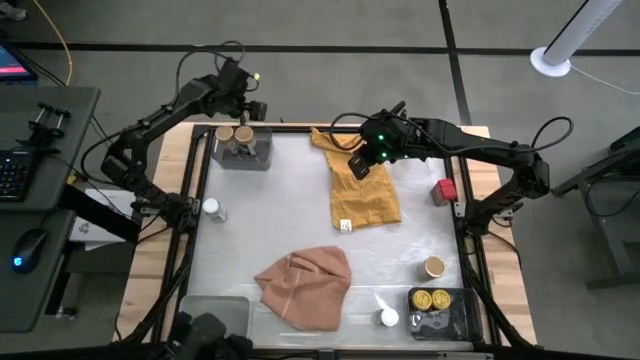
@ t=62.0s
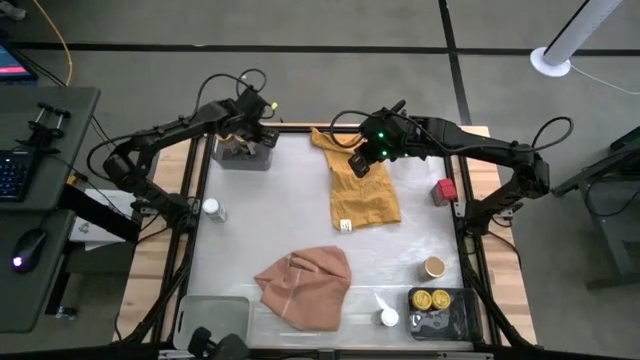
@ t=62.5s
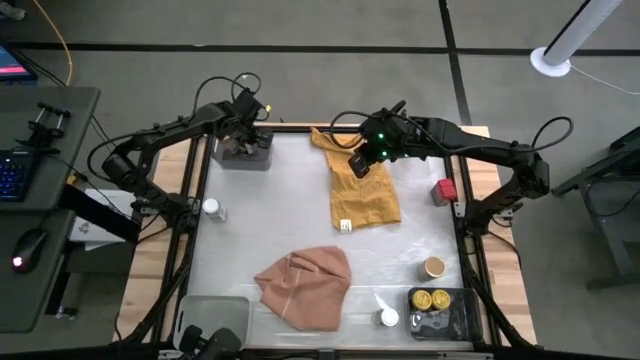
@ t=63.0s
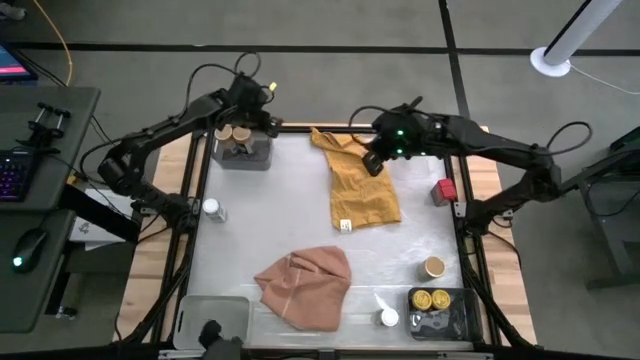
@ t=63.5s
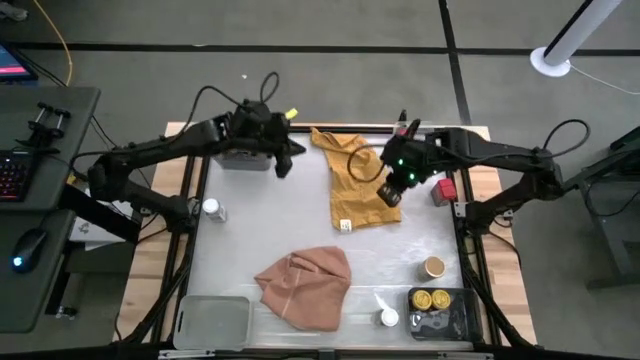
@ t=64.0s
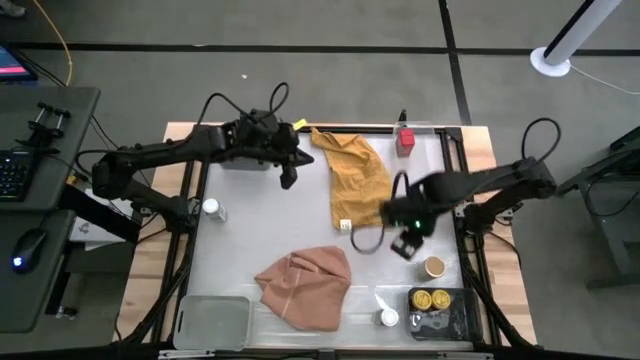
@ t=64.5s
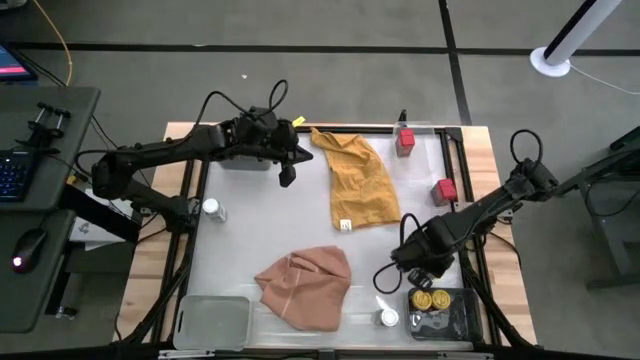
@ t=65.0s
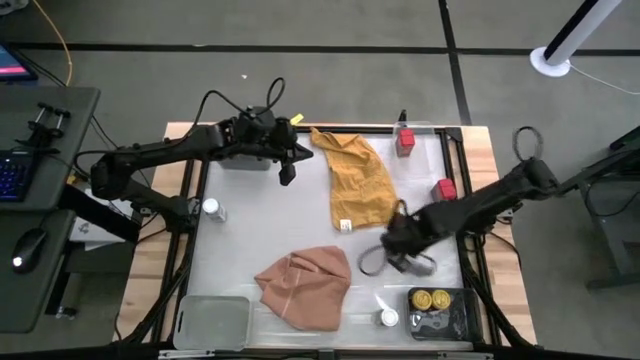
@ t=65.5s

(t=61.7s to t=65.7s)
Task: Sort spices by type
Put the brown seasoning bottle into the top left black bin

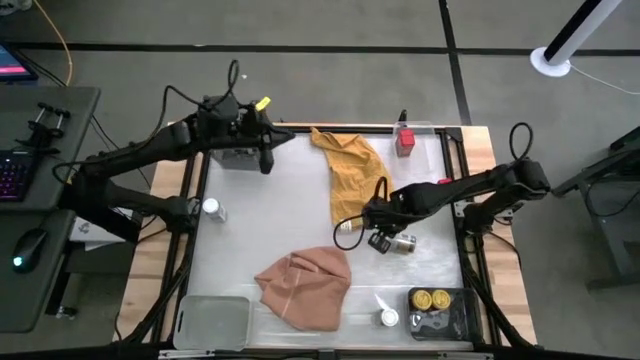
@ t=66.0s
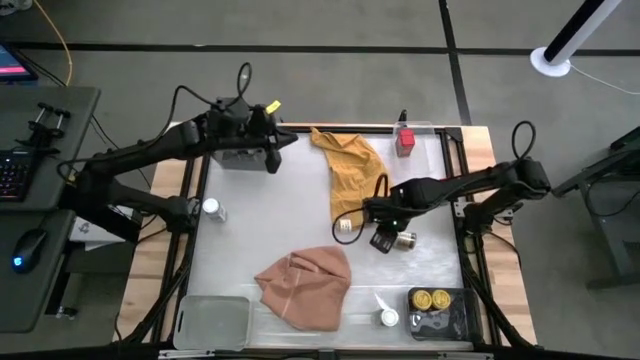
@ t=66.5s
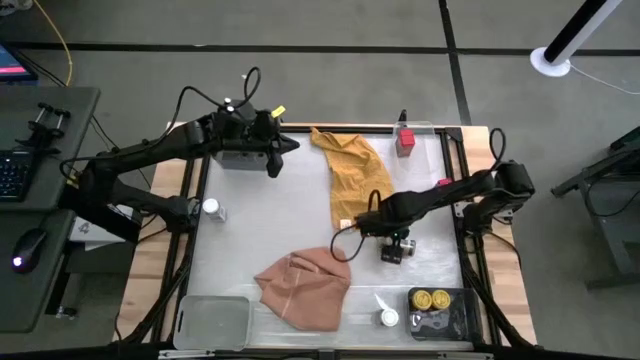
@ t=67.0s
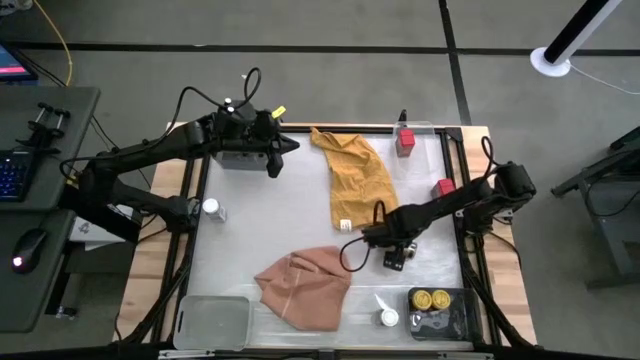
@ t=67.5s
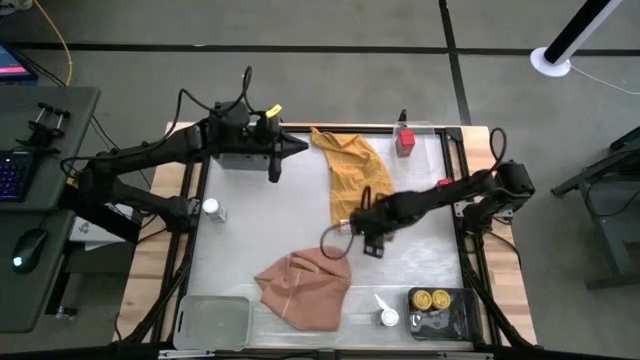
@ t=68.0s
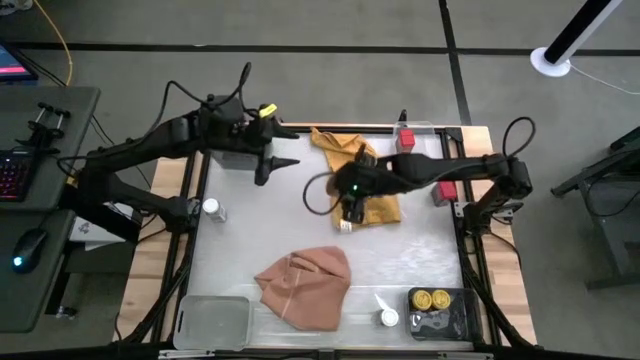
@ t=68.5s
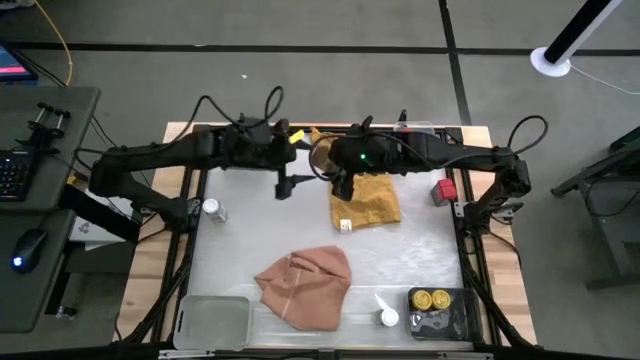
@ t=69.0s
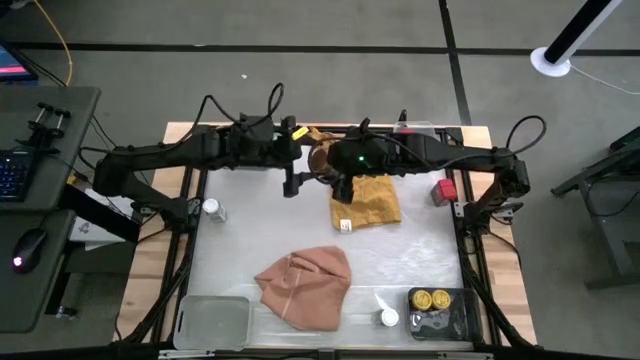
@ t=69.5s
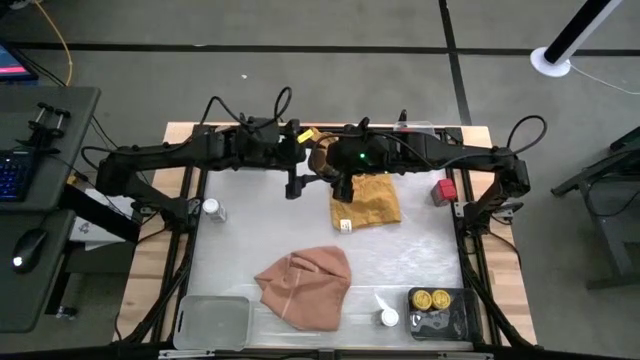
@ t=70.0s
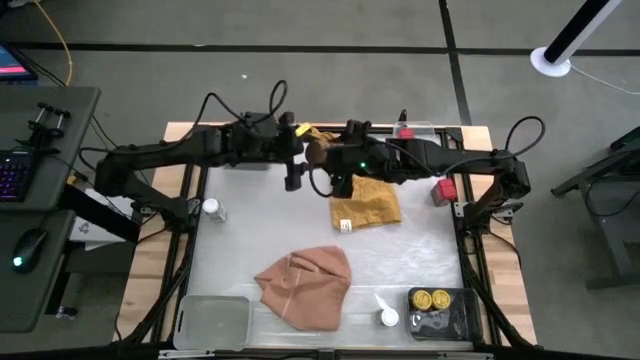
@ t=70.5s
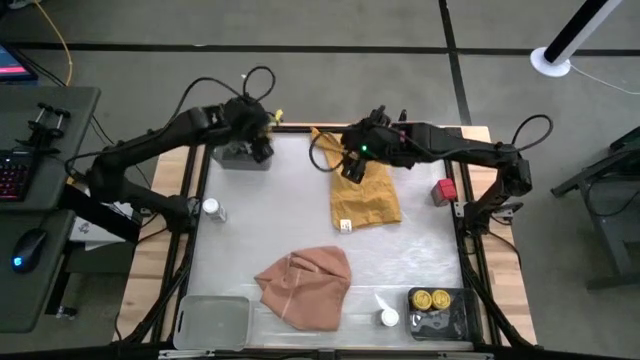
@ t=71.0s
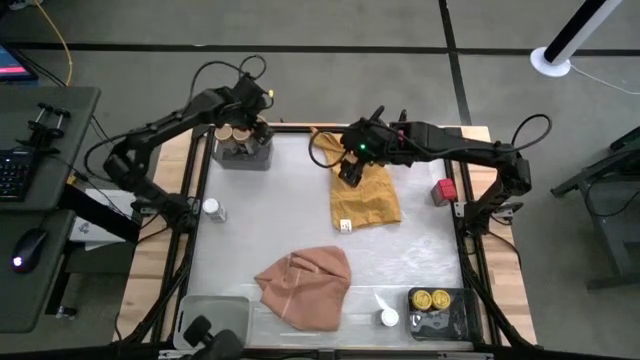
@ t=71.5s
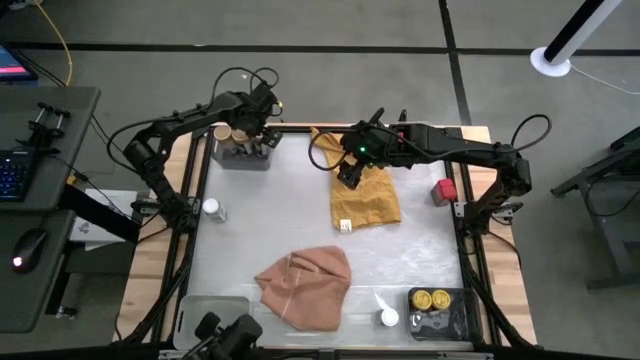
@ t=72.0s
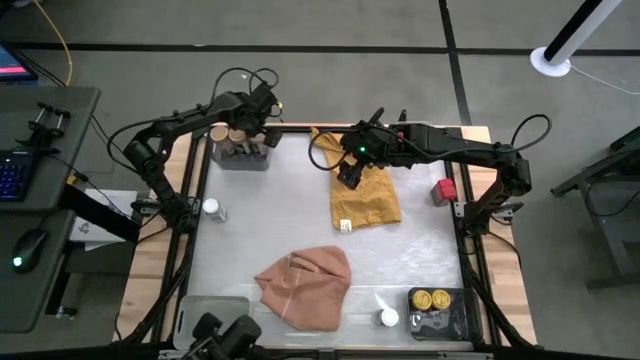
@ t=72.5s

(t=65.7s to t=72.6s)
Put the brown seasoning bottle into the top left black bin

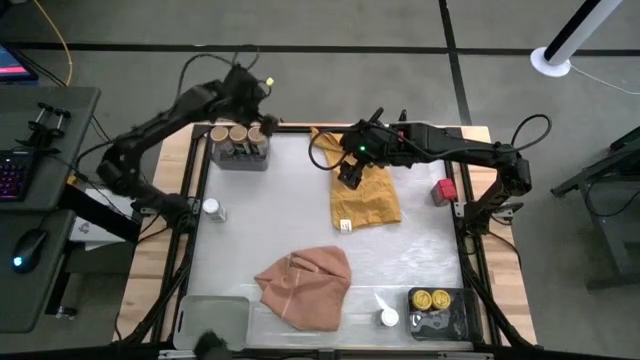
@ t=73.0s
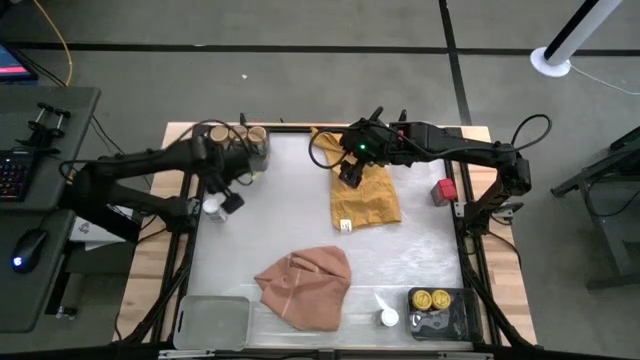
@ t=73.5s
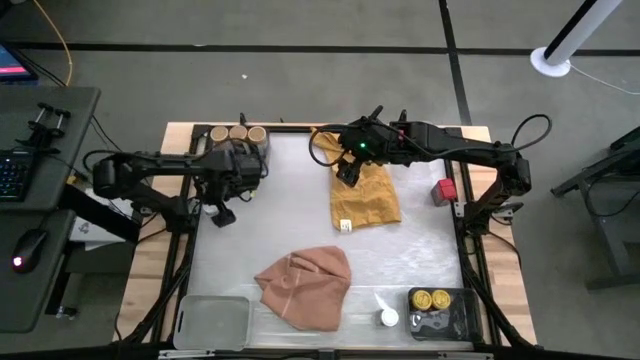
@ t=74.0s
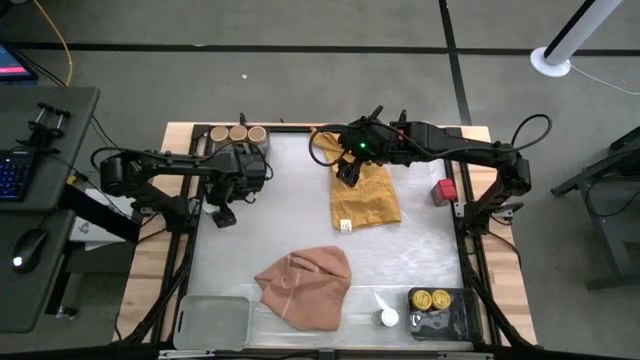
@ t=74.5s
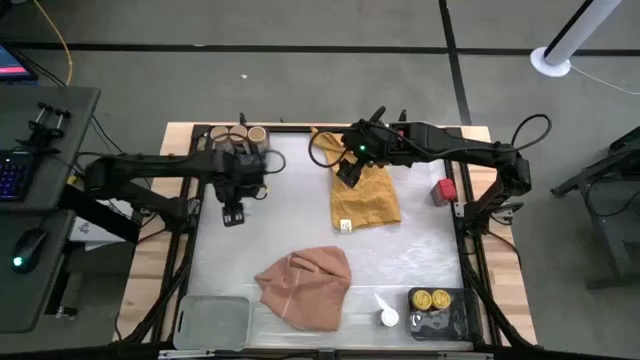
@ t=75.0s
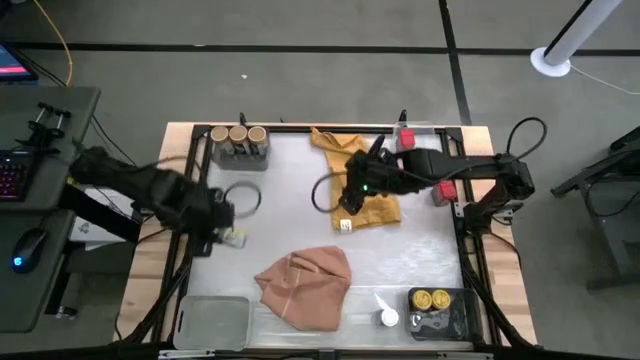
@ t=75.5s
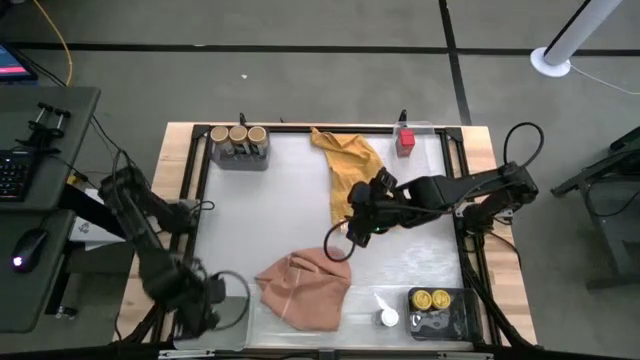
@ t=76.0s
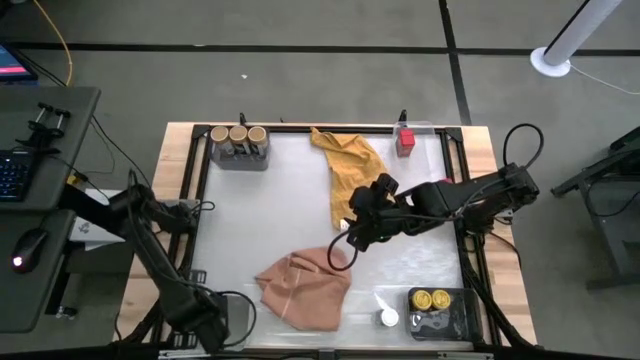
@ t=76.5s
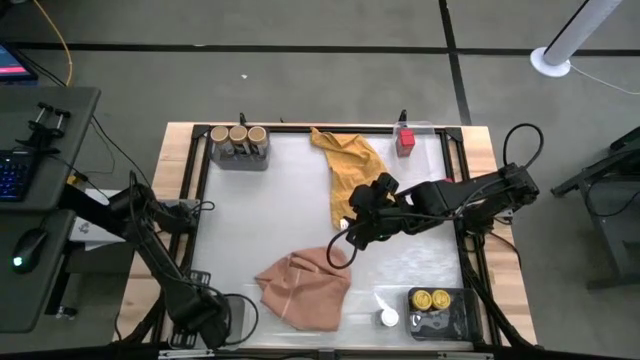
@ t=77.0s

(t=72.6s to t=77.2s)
Put the left white seasoning bottle into the gray bin

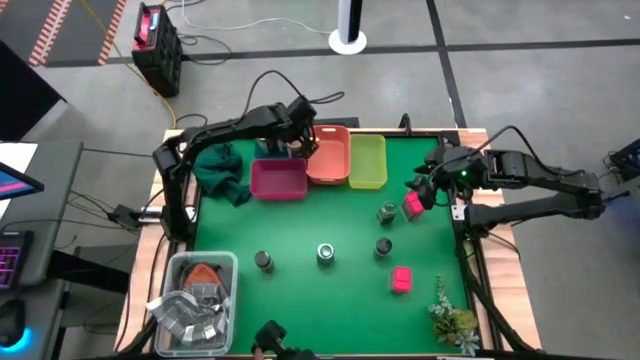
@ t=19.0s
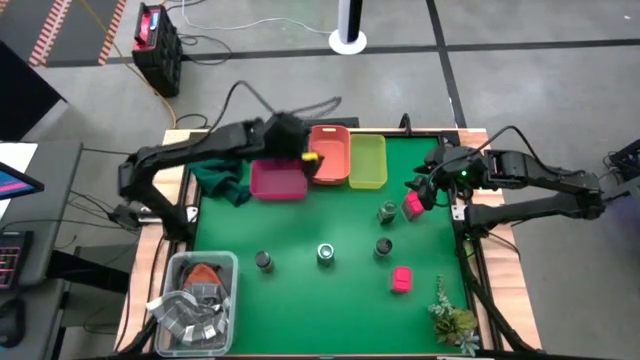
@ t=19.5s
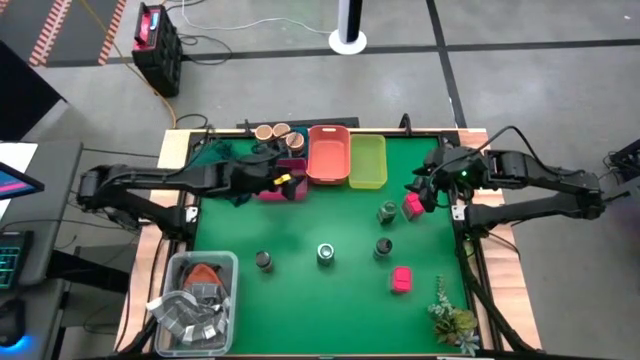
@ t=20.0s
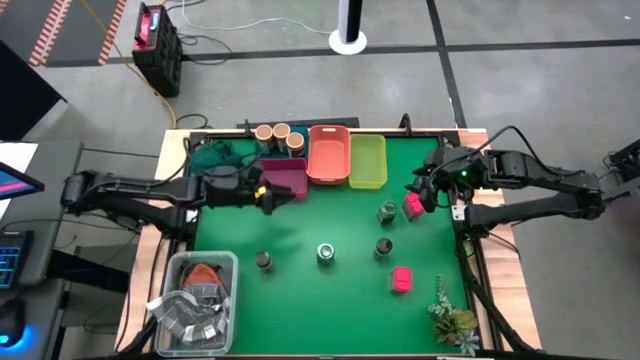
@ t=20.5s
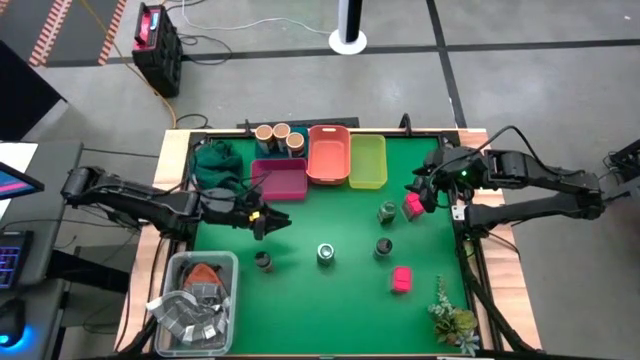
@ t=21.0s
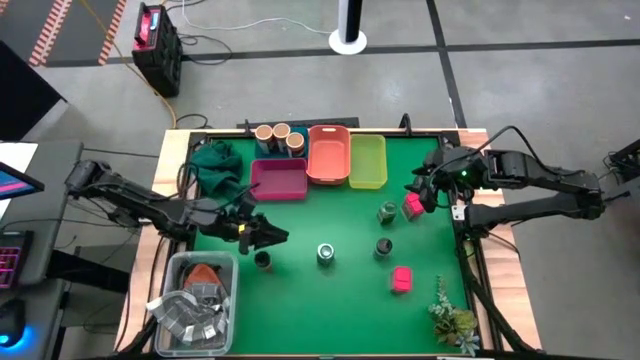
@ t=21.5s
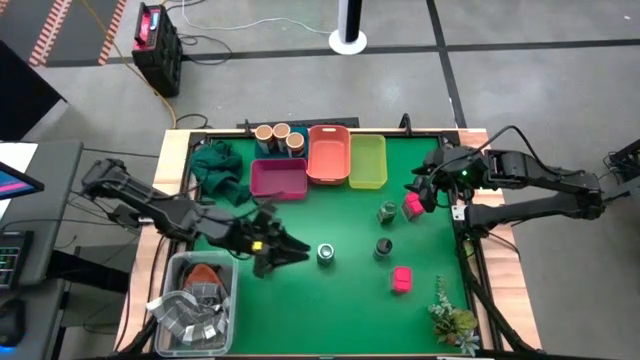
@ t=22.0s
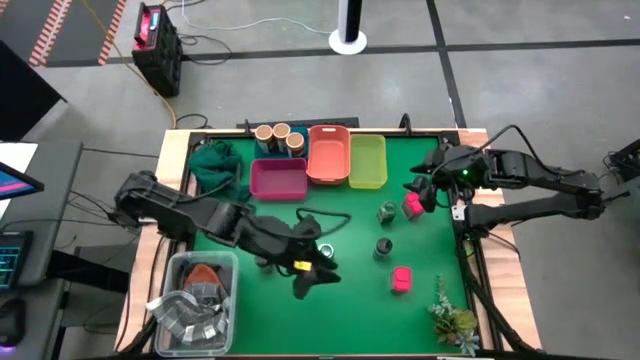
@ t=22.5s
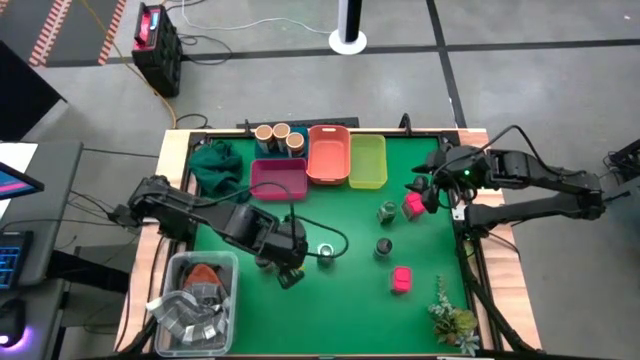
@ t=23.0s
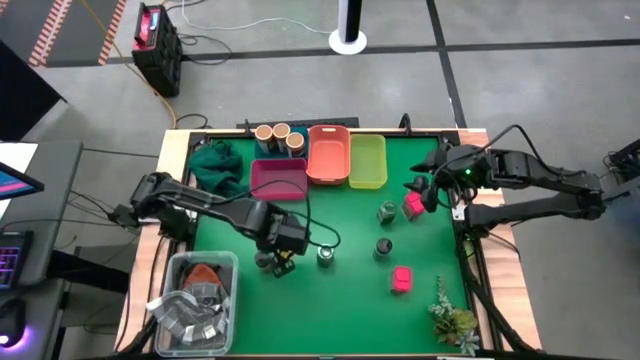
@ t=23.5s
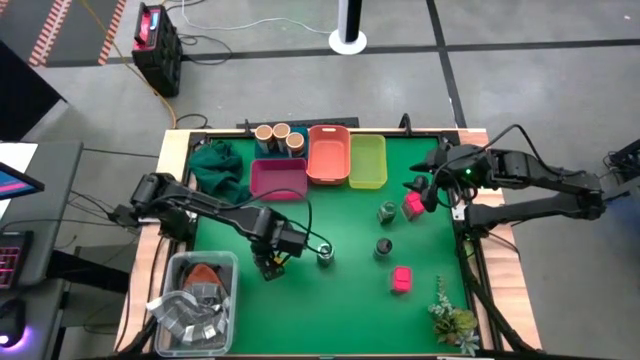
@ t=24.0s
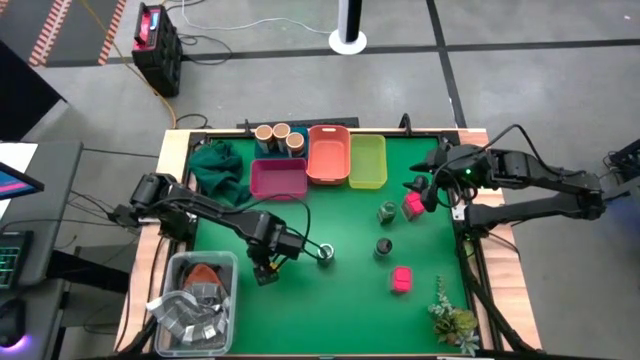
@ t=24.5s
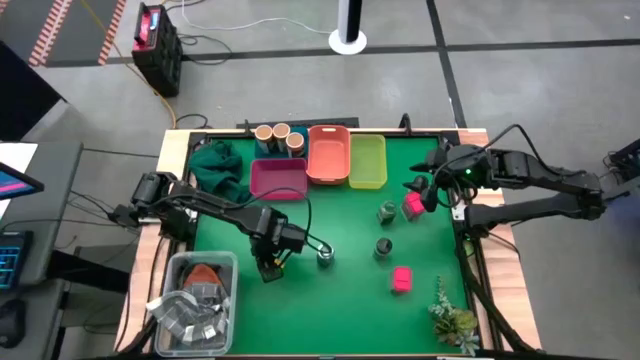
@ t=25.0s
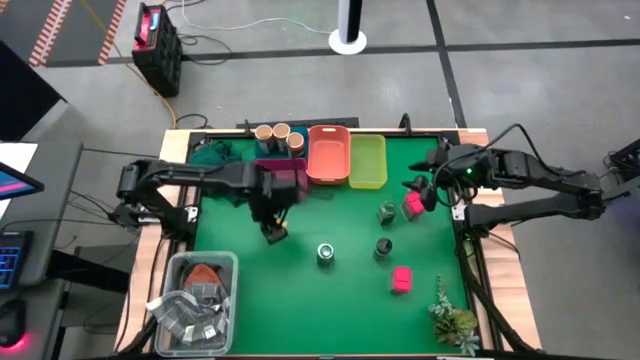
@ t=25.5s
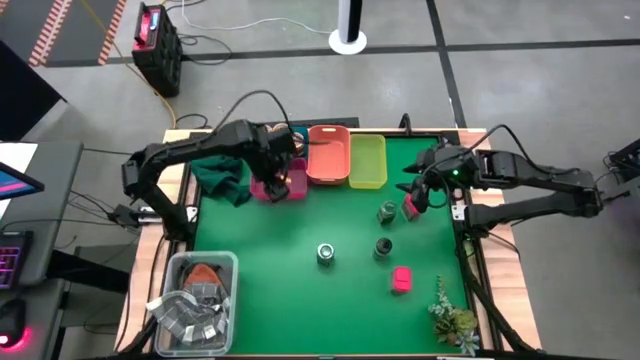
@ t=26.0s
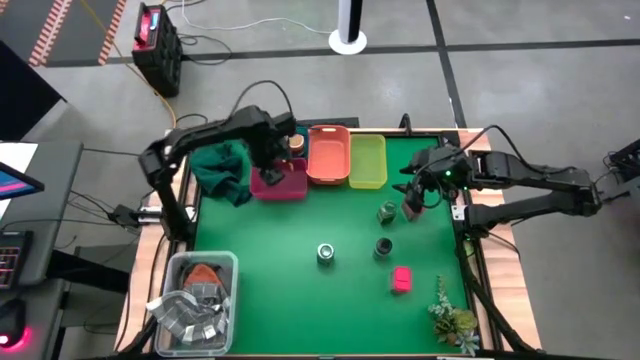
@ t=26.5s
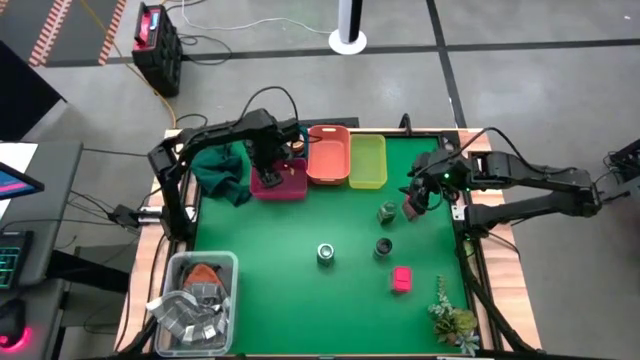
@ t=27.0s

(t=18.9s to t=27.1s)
Task: Sort spices by type
Put the bottom left black seasoning bottle into the red bin
